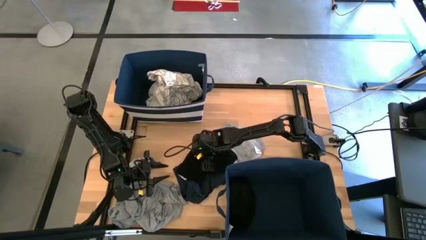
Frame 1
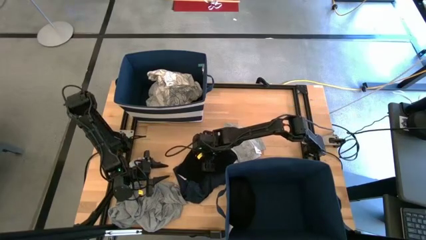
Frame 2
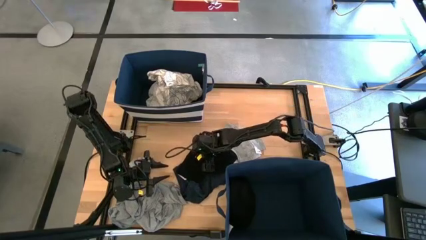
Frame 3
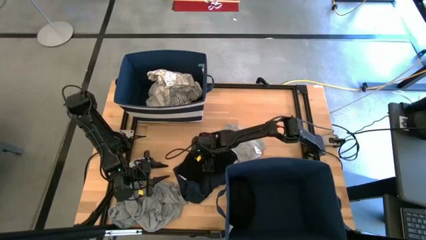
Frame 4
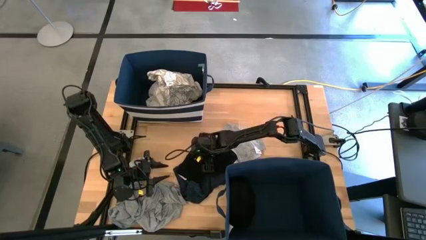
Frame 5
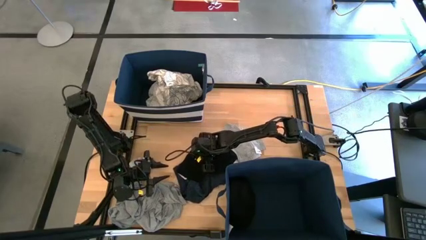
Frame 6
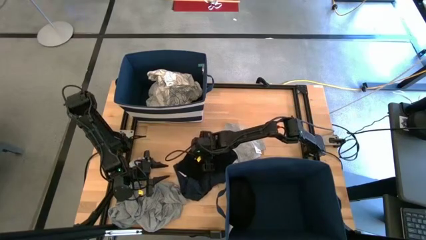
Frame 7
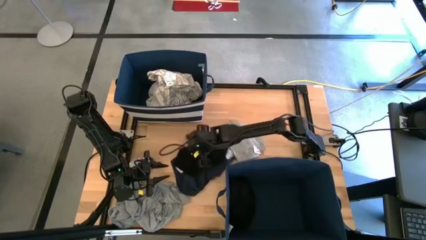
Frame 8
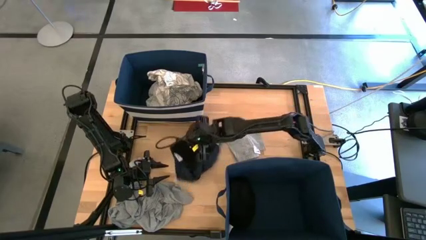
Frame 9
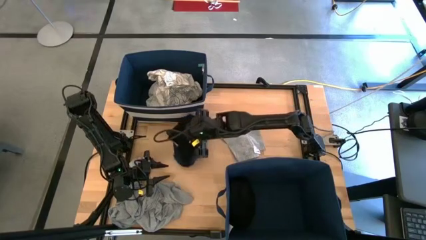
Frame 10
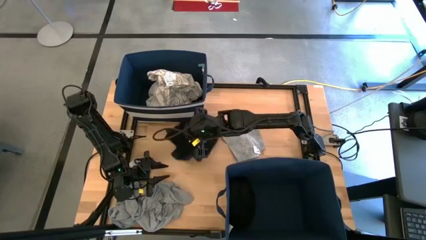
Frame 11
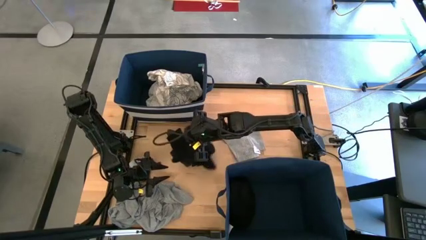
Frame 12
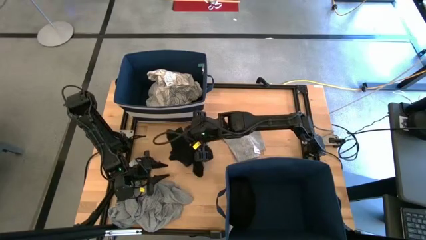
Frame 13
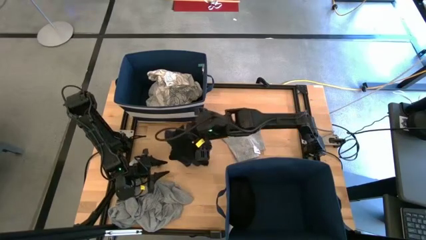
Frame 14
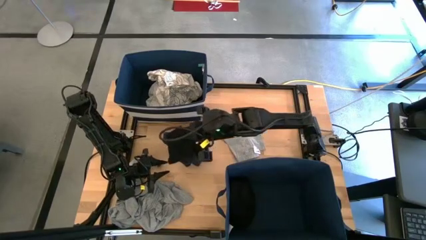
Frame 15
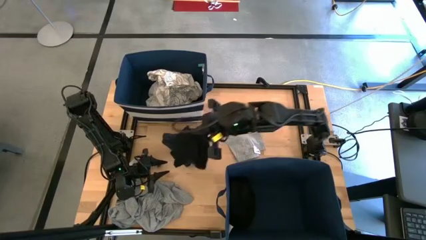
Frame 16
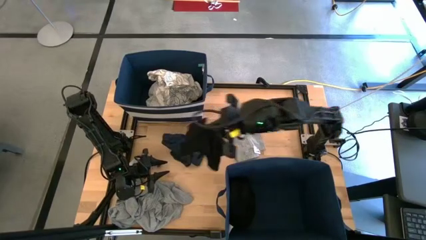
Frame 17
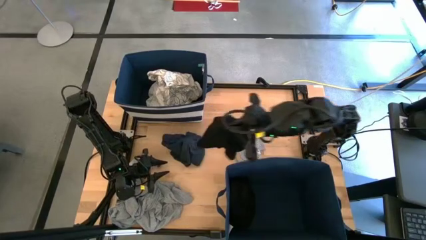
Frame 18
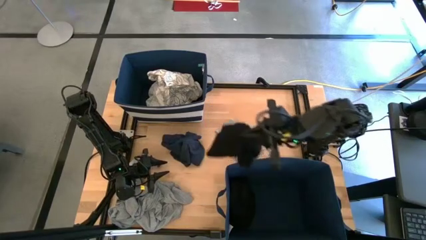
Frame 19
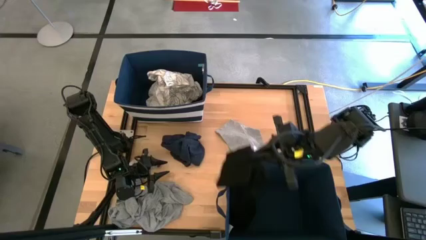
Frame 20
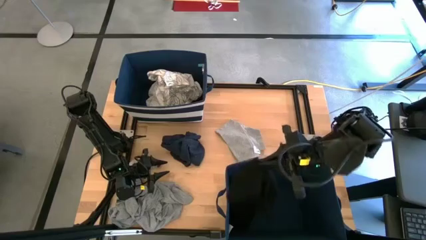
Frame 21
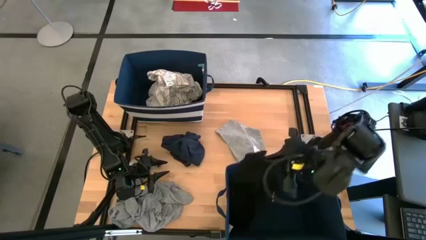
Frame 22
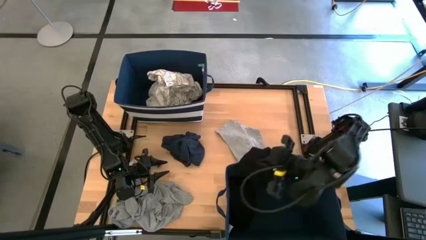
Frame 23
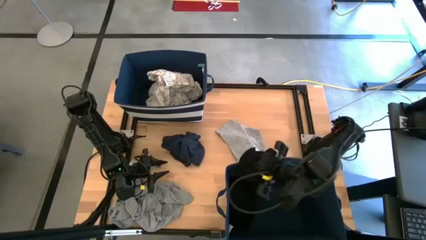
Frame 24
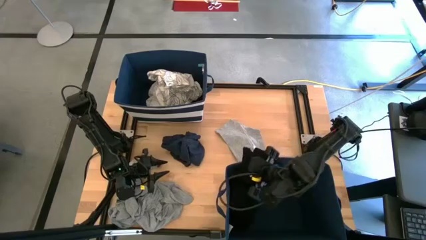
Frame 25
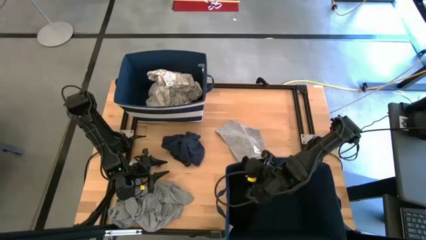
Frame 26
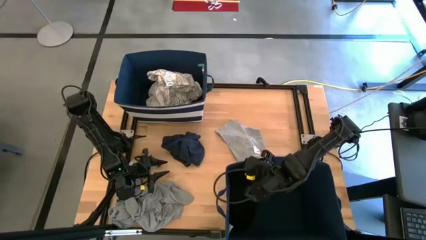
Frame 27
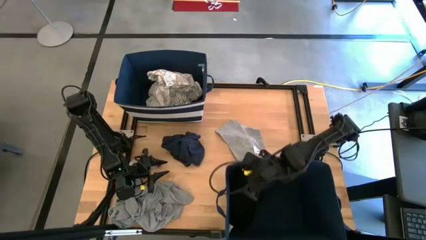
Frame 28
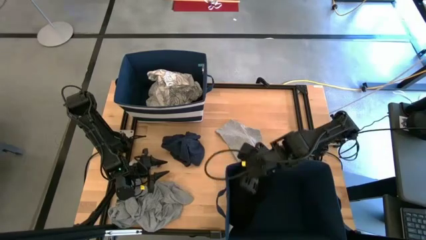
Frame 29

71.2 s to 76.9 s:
Task: Sort clothes
Put the black boxer into the bottom laundry organizer

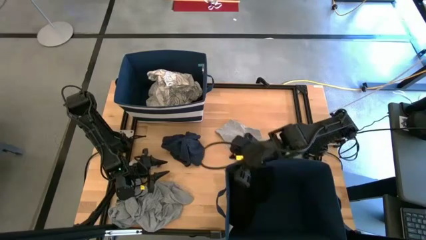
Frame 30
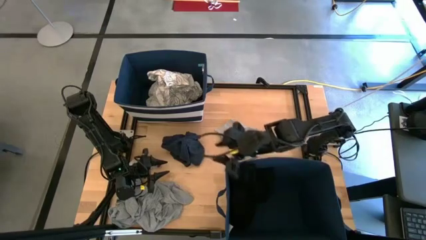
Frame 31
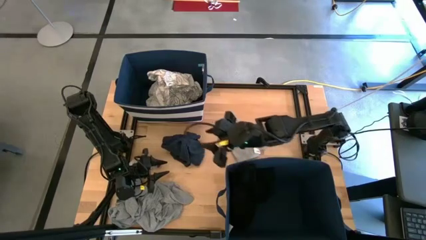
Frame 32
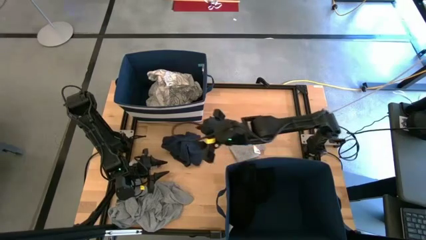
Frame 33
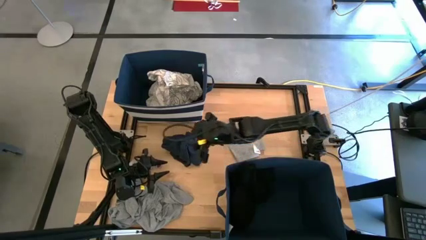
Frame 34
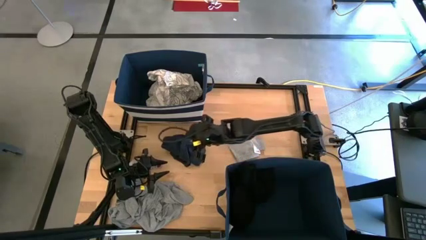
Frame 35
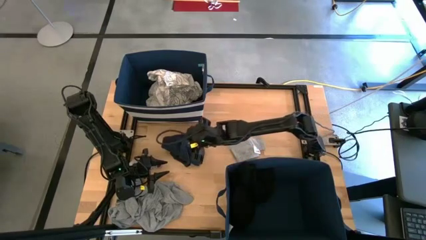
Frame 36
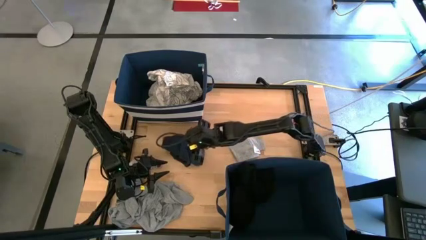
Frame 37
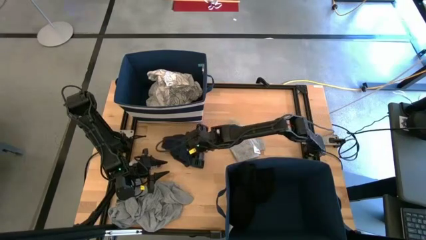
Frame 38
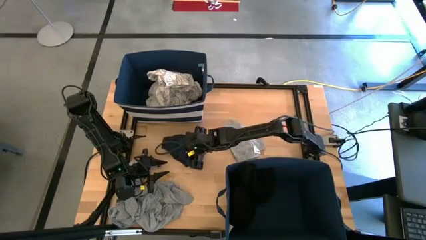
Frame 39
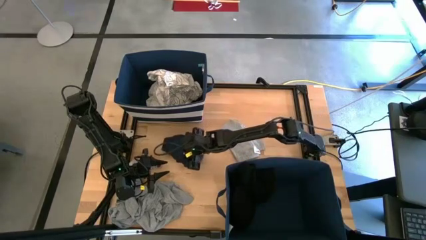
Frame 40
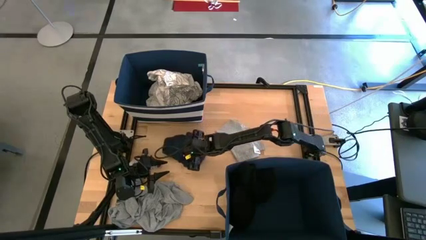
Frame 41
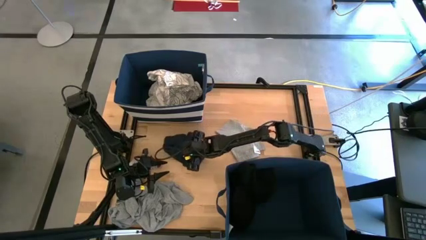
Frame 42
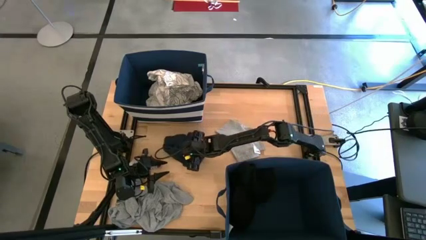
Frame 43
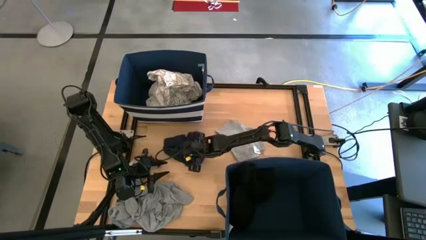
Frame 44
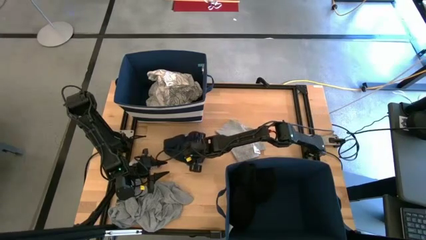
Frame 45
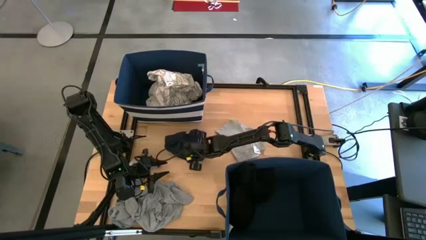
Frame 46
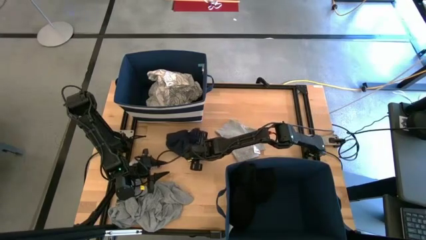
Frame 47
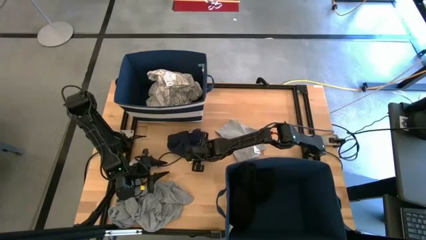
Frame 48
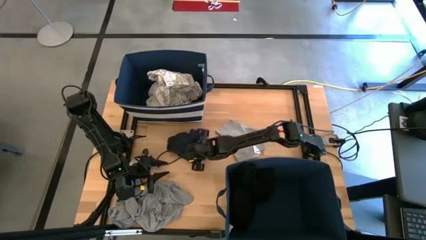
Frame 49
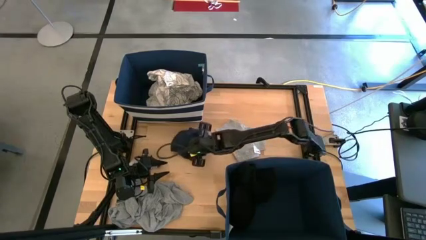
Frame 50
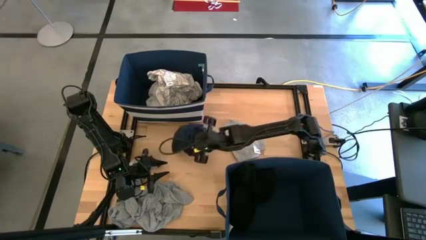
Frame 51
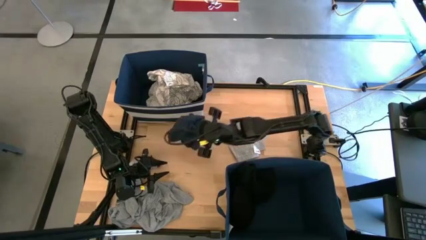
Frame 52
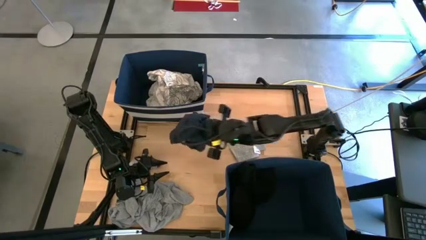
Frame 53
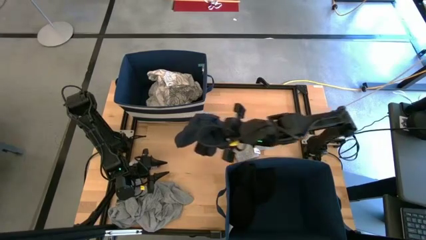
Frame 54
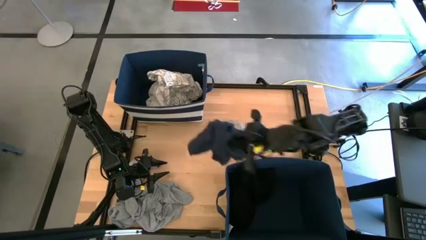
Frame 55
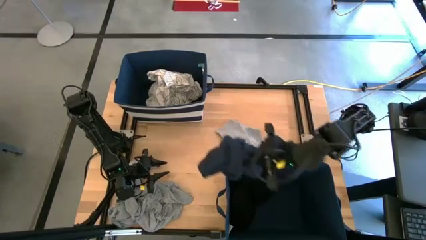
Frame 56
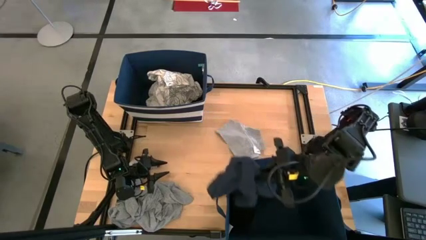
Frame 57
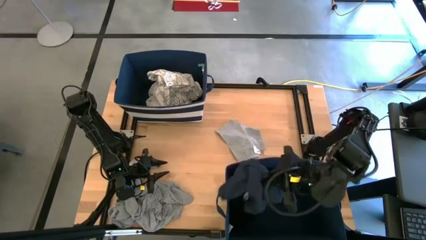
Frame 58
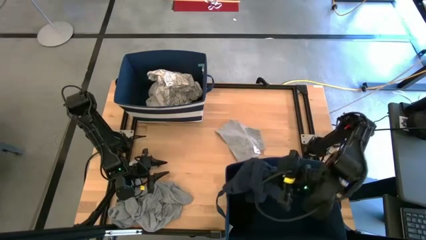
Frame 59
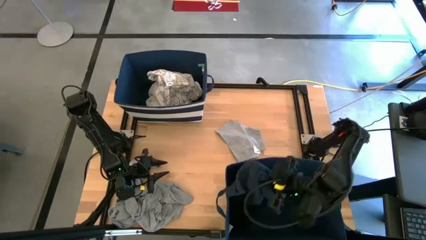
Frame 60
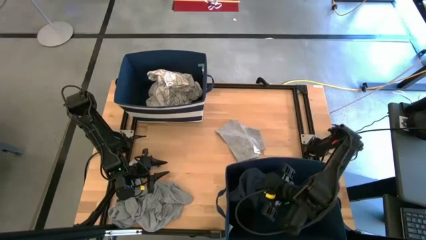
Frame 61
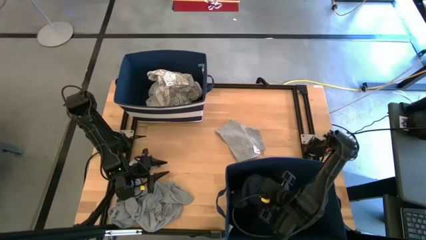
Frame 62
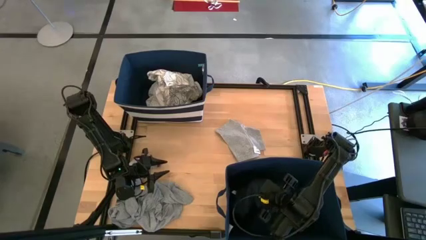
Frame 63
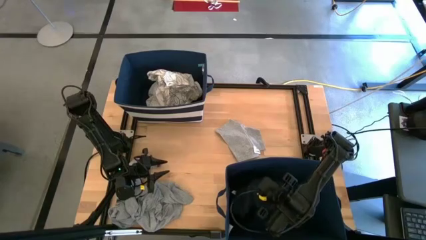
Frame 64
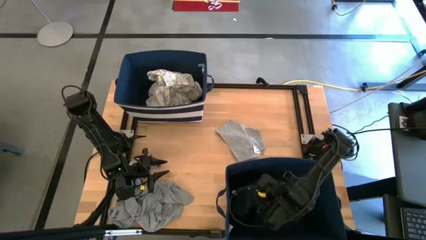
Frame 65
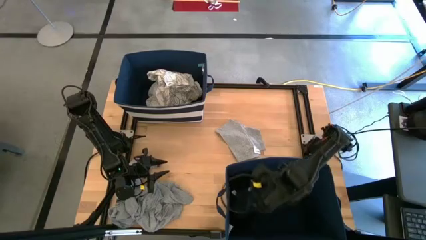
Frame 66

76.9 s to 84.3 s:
Put the dark gray shorts into the bottom blue laundry organizer

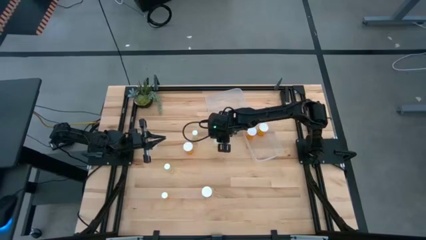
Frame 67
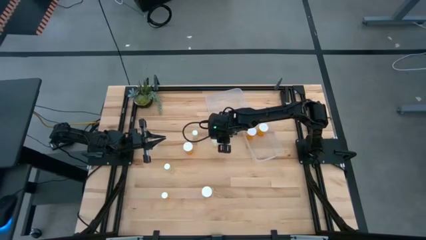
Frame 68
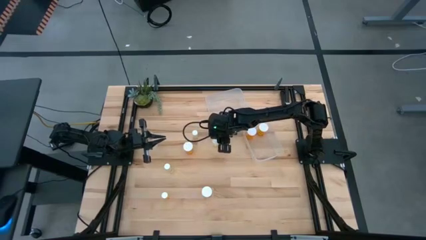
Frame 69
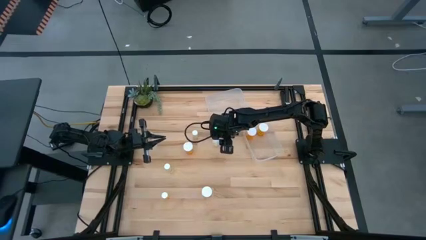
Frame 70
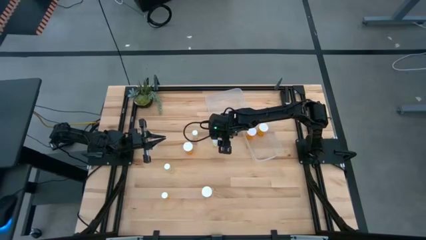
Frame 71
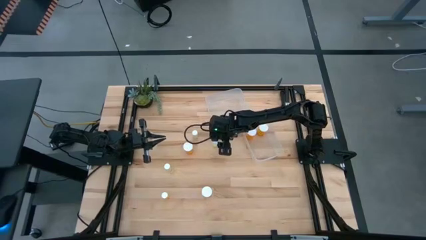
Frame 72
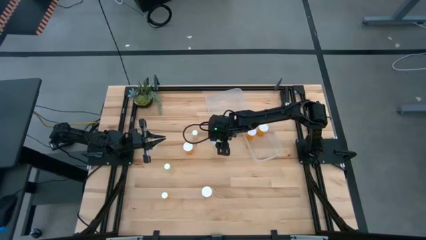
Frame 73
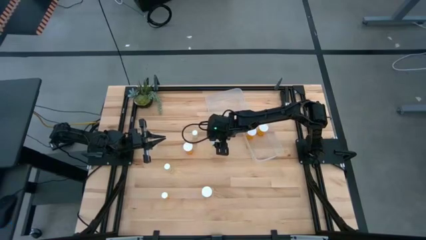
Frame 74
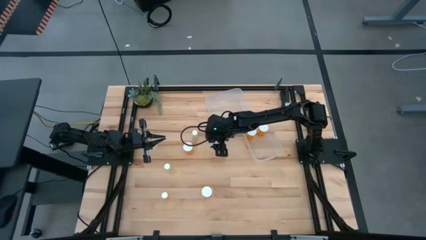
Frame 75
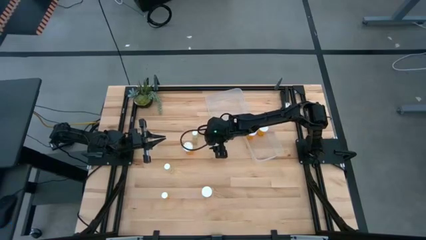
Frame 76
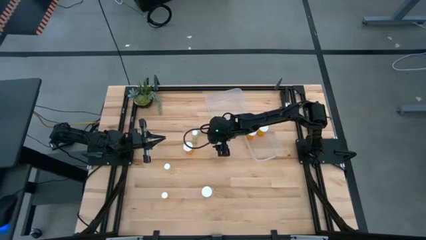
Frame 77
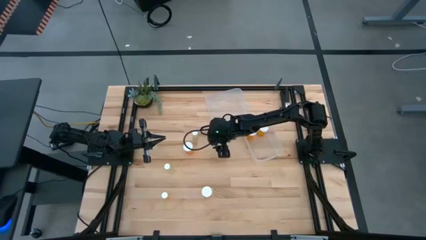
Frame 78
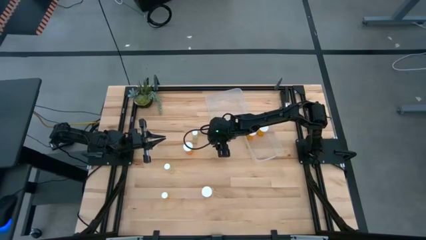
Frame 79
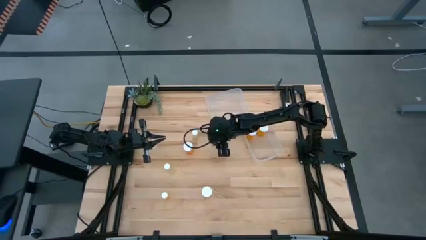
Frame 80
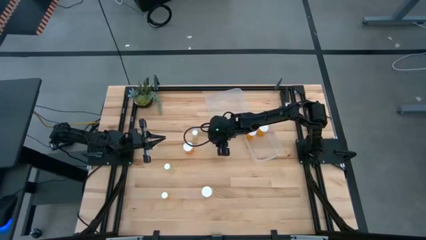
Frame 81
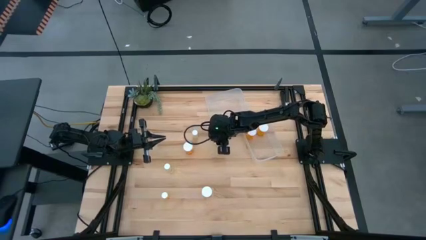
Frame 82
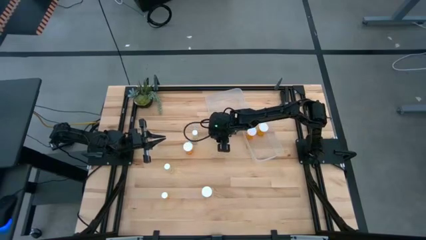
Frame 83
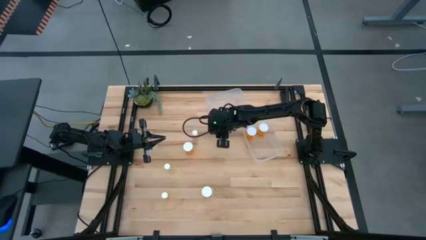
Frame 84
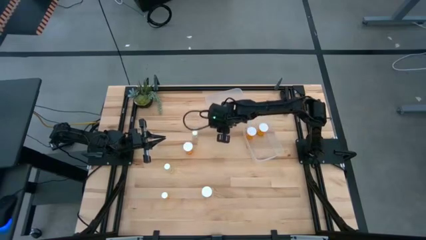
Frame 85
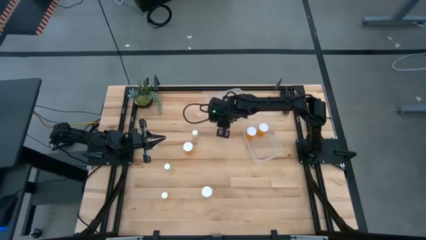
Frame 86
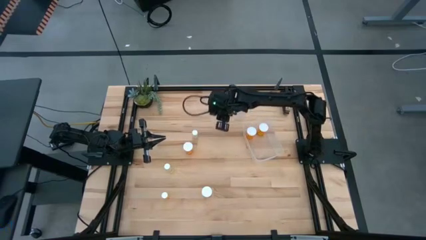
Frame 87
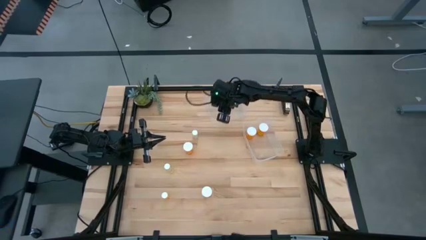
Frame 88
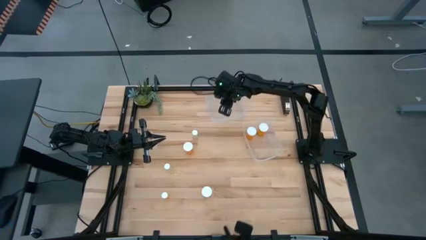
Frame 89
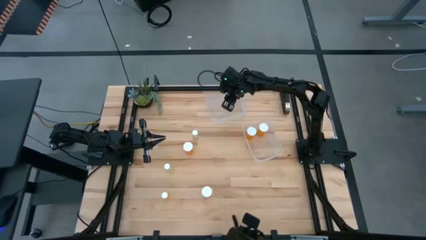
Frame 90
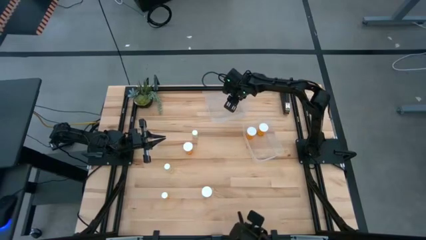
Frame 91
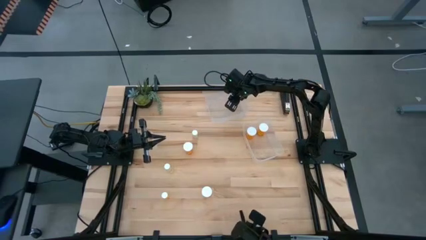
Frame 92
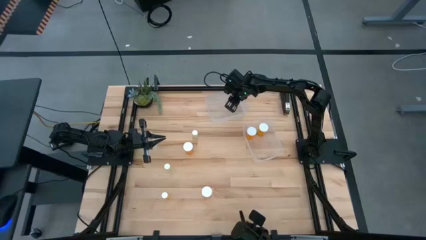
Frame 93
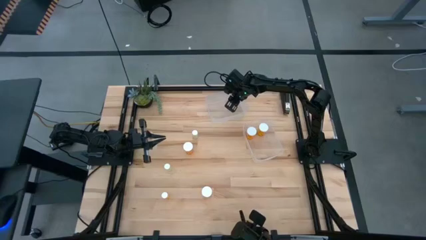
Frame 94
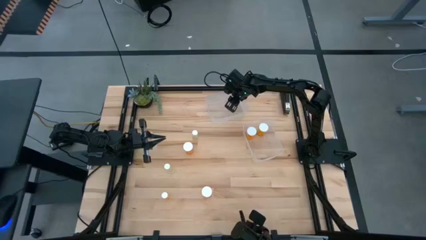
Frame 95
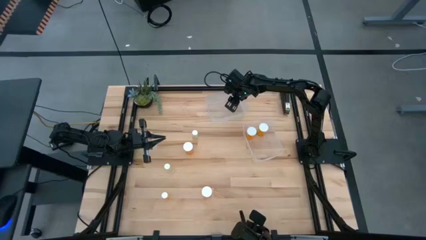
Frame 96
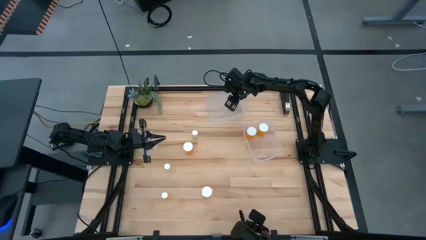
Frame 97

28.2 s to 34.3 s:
Task: Pick and place medicine bottles into bin by pill shape (circle, oval)
Put the top right small yellow pill bottle into the top transparent bin
